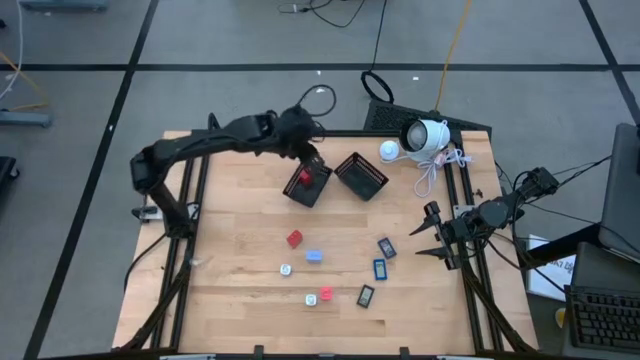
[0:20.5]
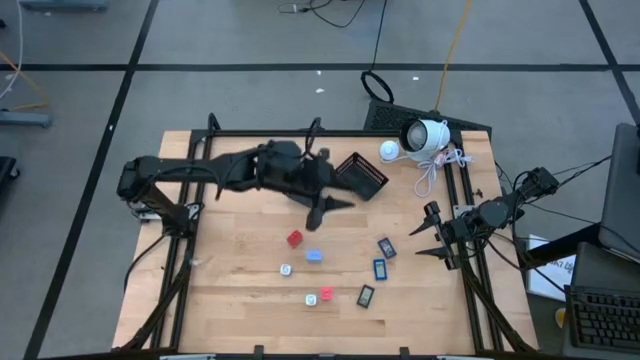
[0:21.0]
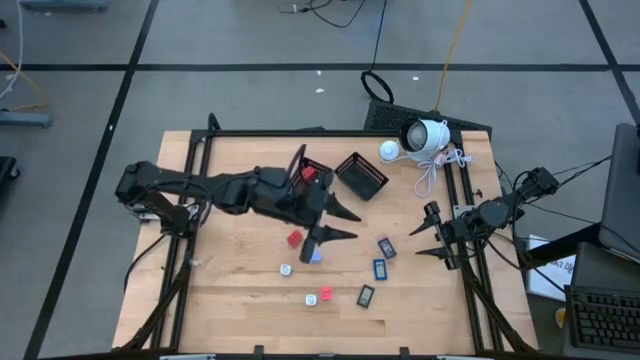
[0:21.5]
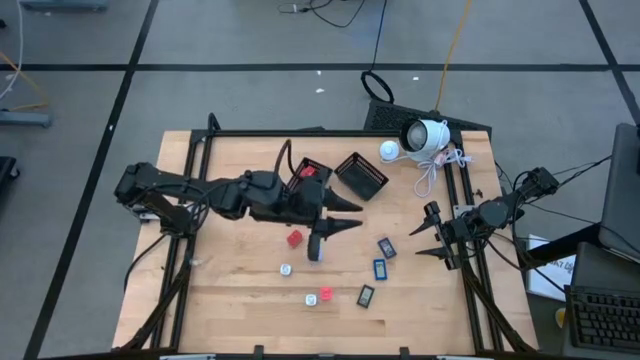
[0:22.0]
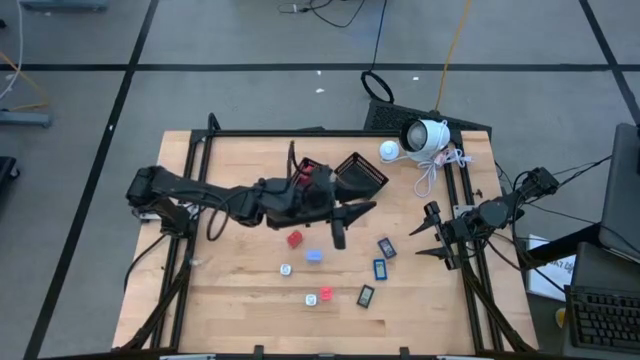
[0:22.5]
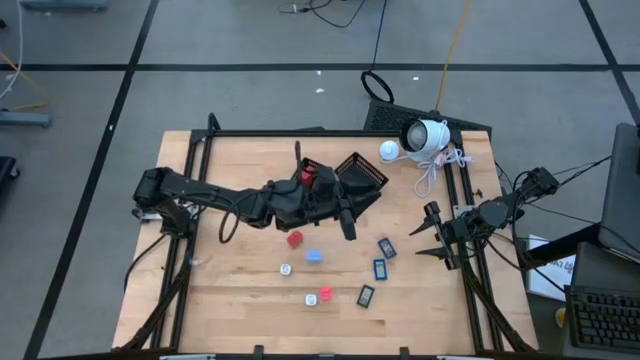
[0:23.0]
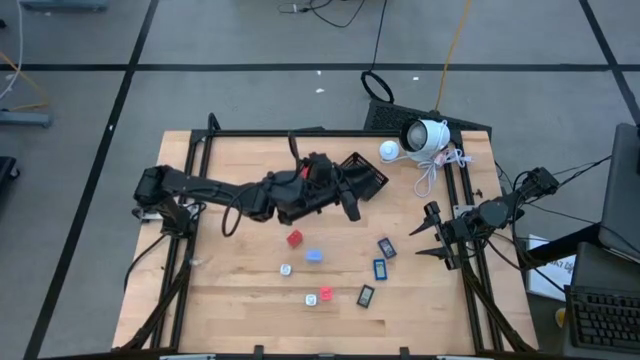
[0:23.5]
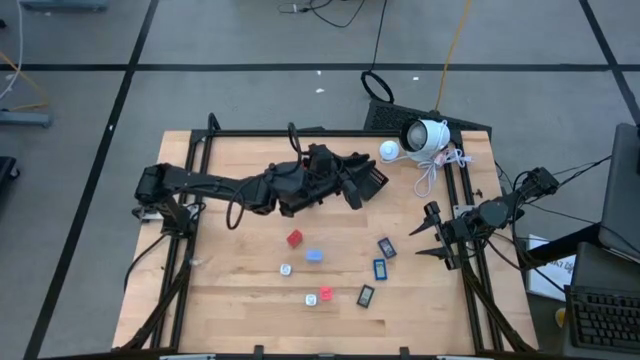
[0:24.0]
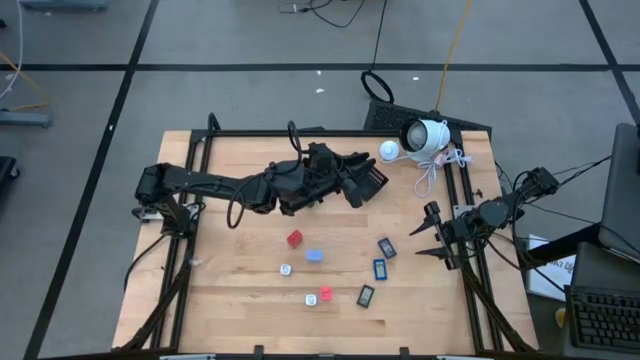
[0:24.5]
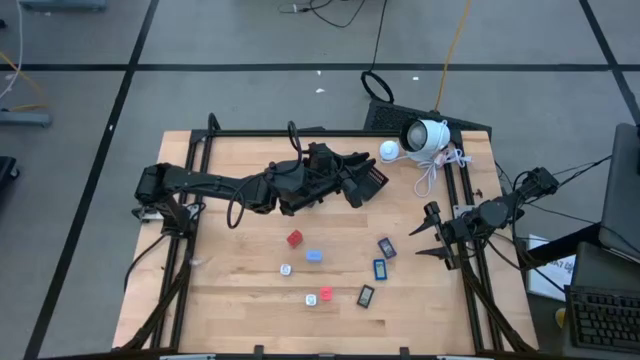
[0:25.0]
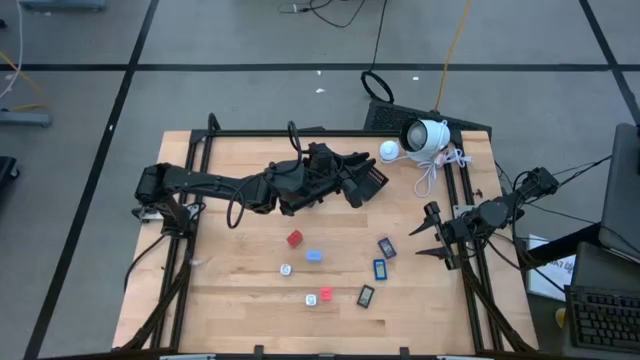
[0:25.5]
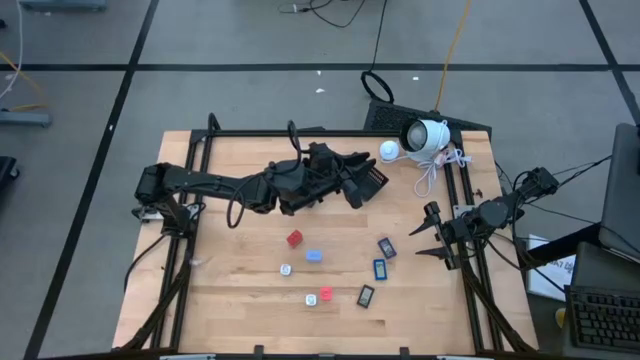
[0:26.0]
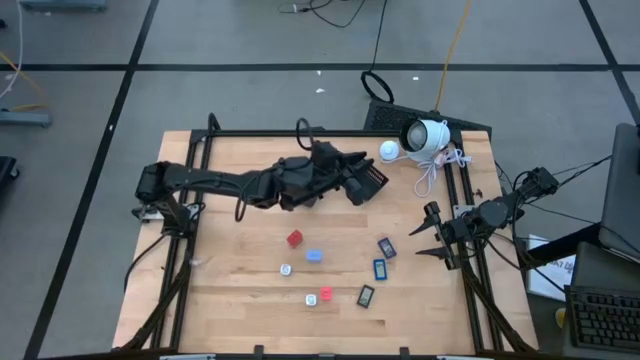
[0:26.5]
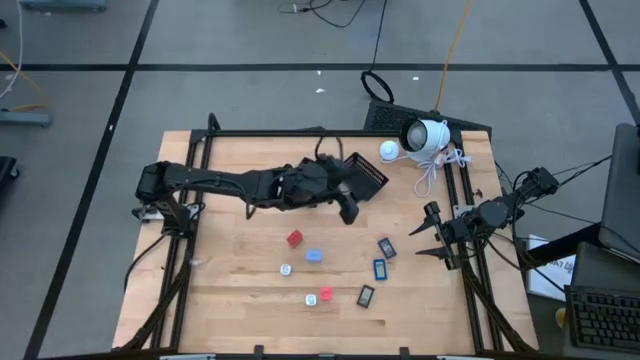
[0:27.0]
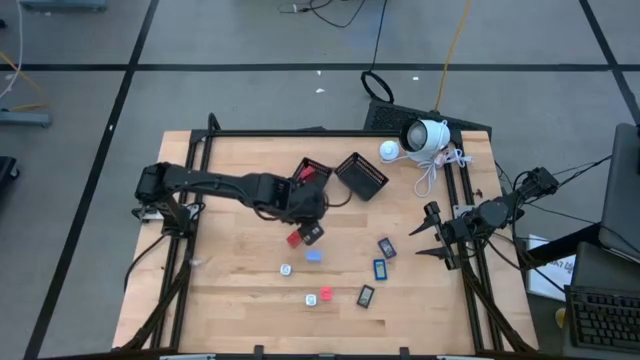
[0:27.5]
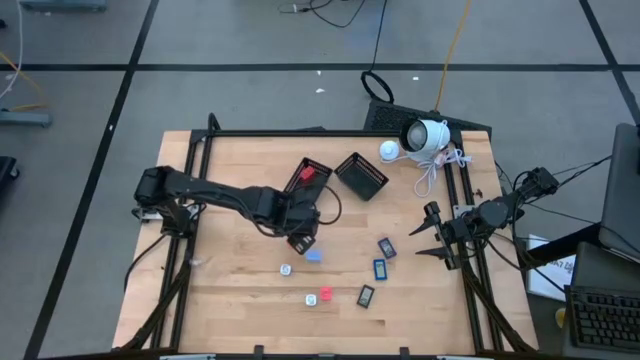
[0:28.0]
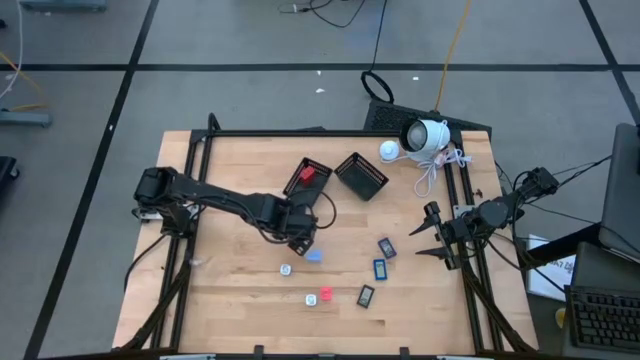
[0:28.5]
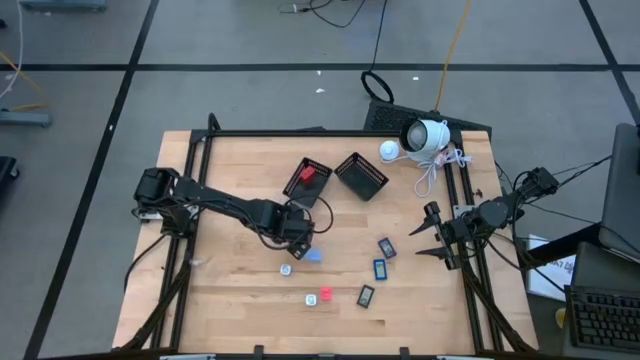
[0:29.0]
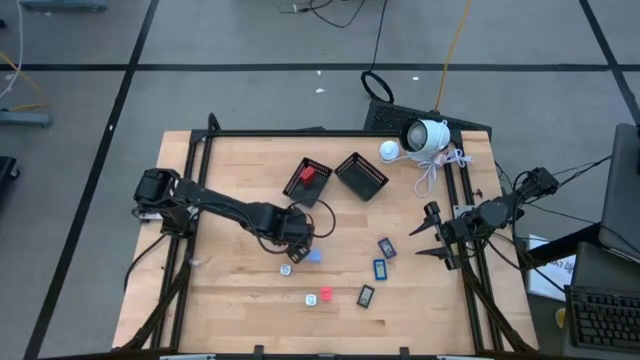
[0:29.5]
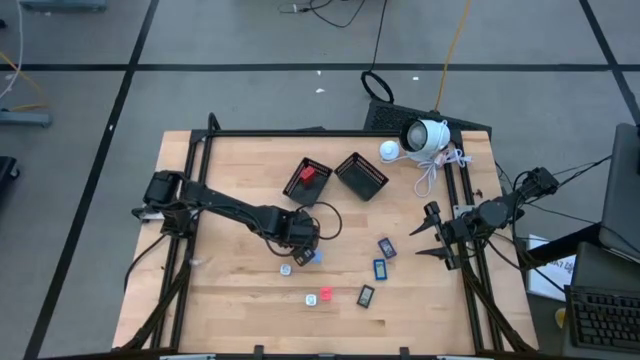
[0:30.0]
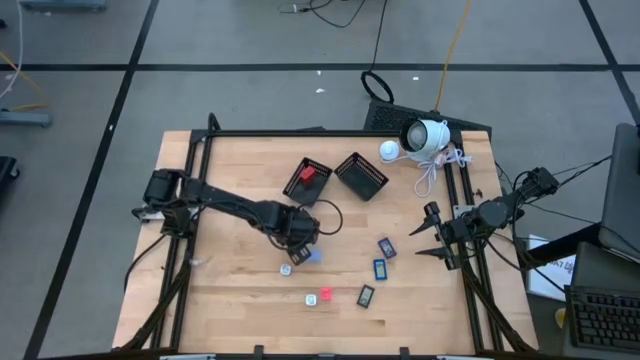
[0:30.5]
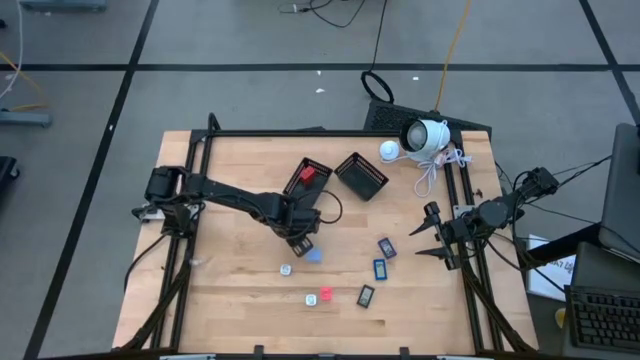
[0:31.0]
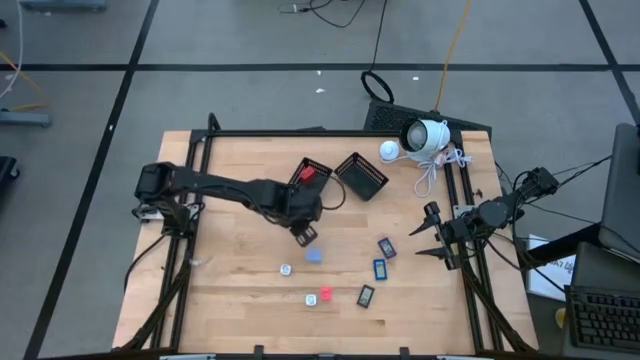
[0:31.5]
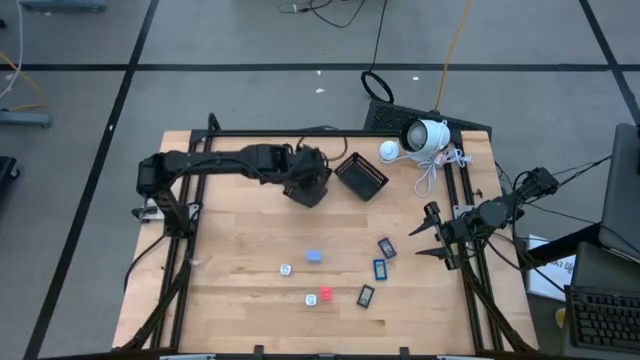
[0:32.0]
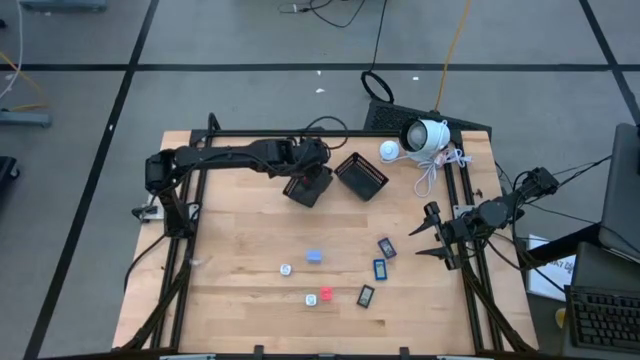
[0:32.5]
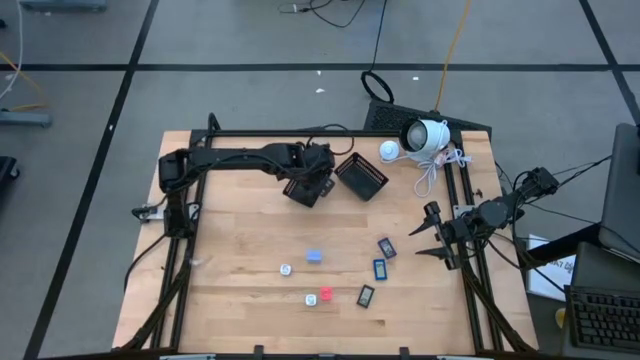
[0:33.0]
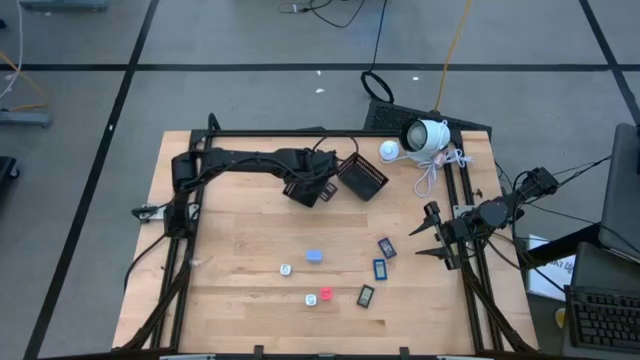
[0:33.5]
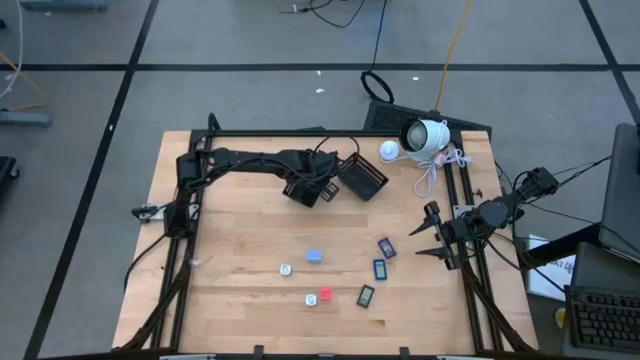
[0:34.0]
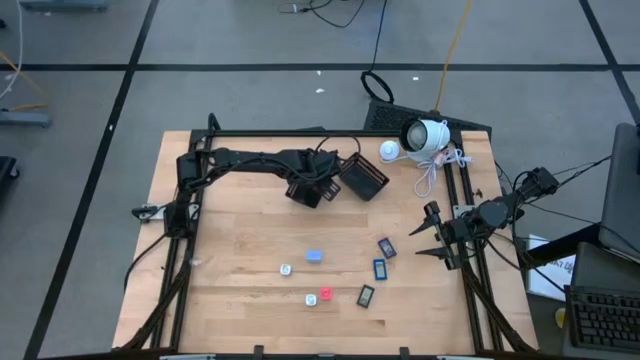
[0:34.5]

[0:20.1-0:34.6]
Task: Pick & Place Office items
Put the red charger adapter into the left black bin

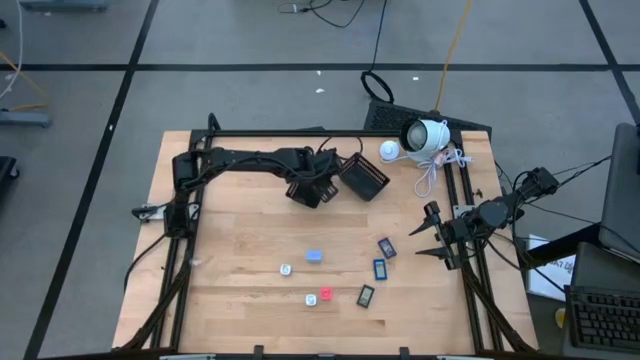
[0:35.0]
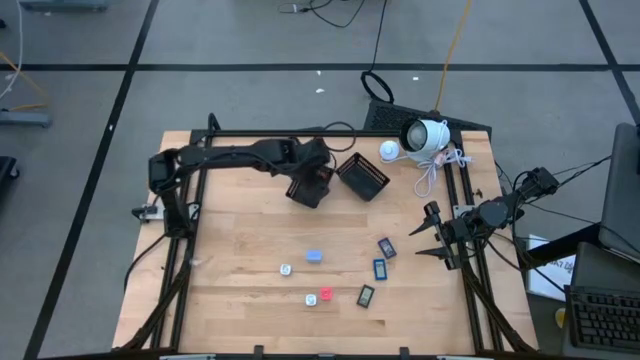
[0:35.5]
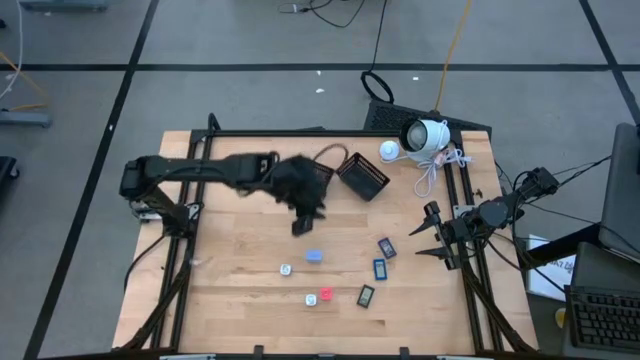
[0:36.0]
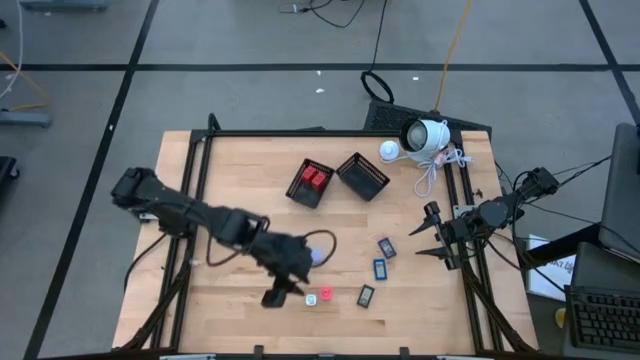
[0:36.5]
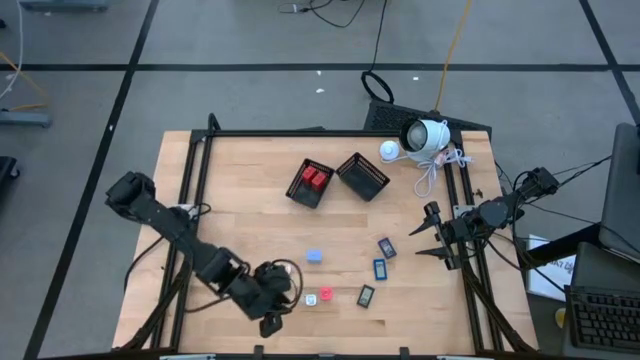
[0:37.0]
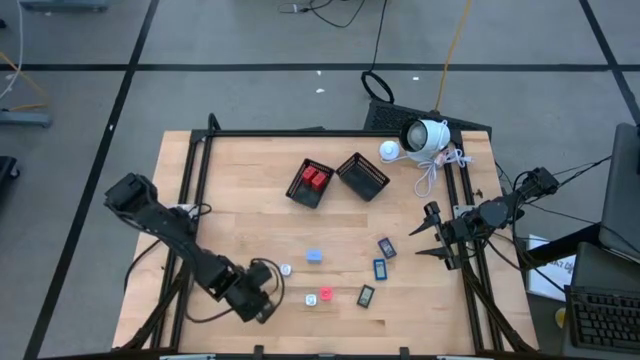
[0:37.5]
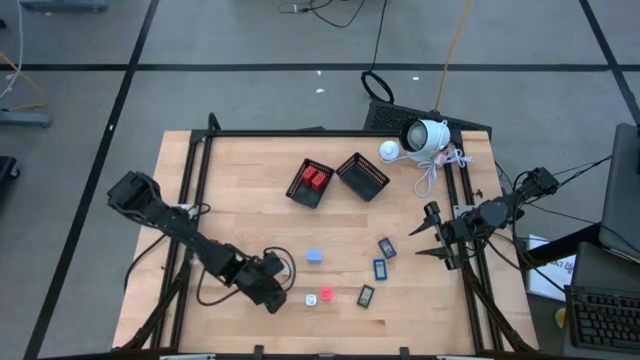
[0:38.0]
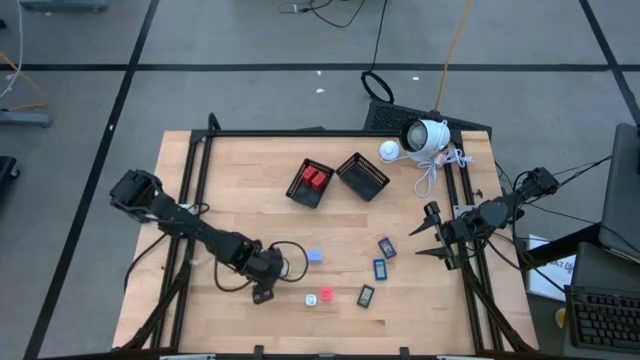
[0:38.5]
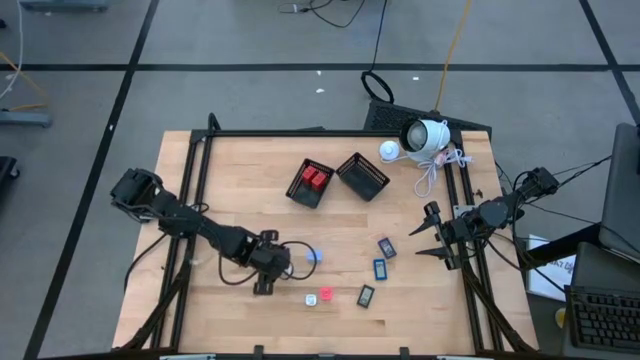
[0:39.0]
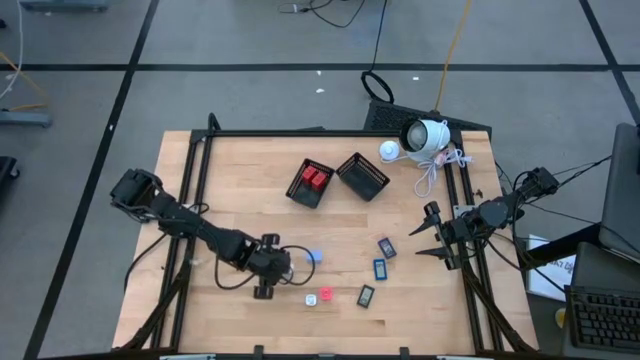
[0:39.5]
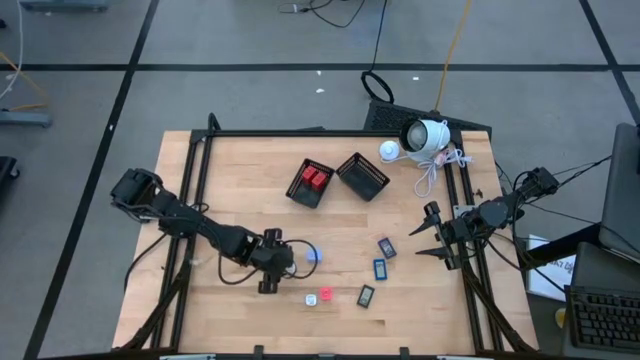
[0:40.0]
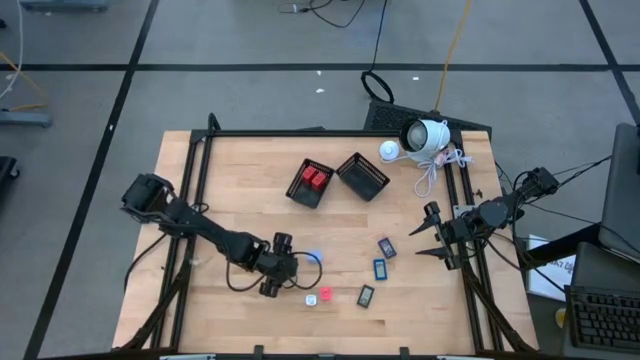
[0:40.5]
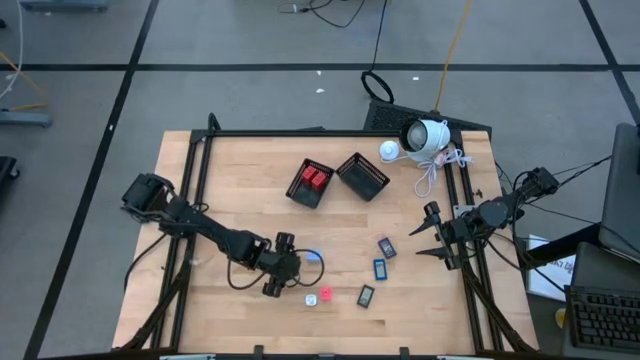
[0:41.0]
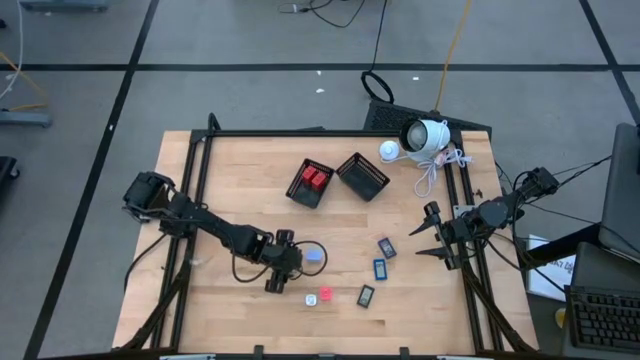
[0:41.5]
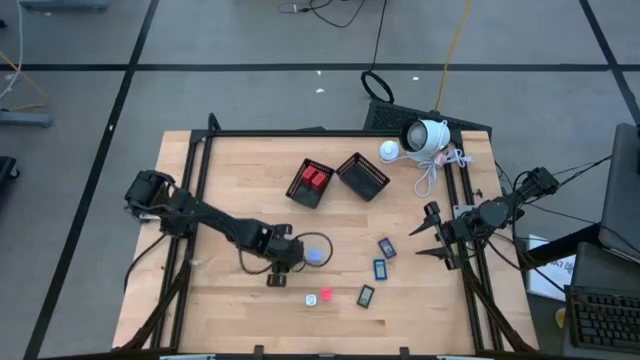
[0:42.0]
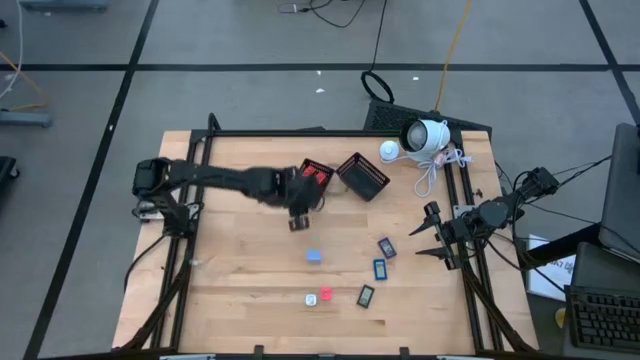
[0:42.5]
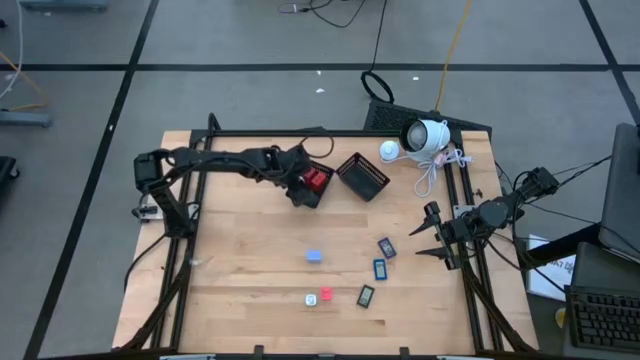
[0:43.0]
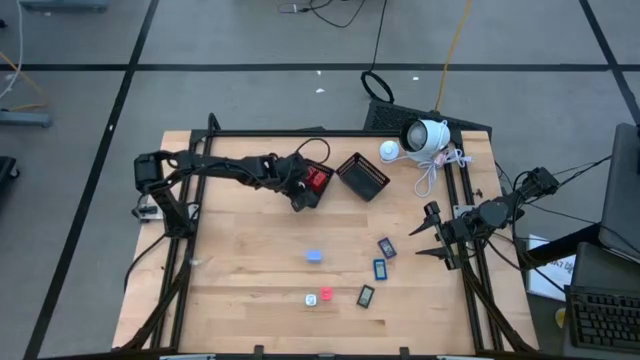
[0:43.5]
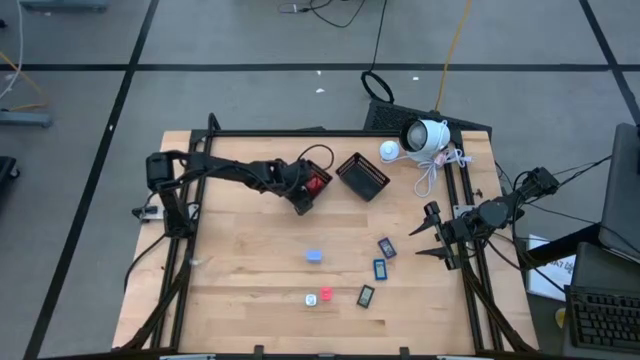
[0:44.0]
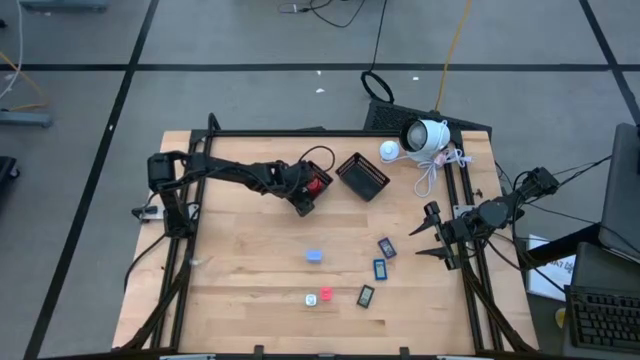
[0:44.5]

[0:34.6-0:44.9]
Put the violet charger adapter into the left black bin
